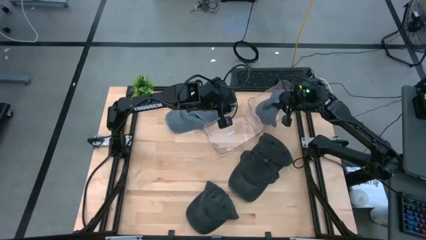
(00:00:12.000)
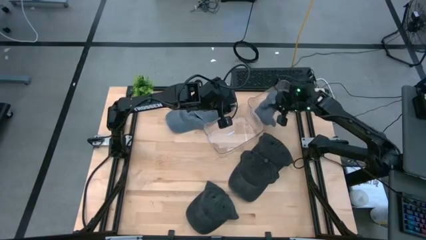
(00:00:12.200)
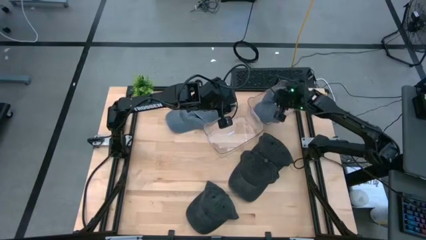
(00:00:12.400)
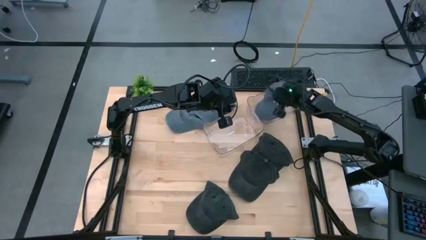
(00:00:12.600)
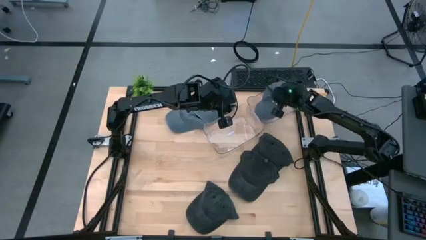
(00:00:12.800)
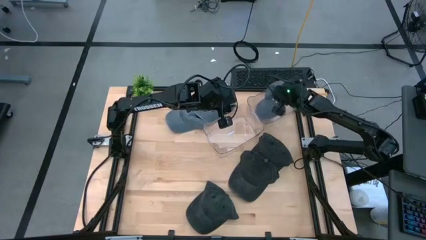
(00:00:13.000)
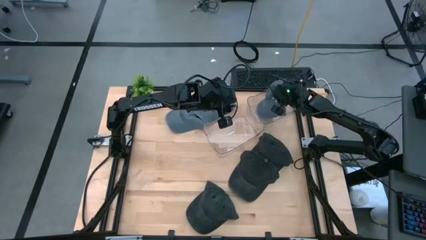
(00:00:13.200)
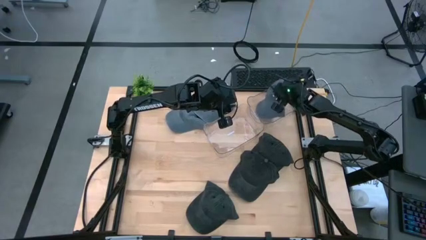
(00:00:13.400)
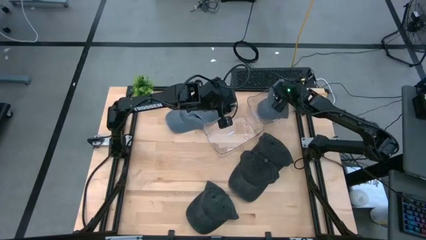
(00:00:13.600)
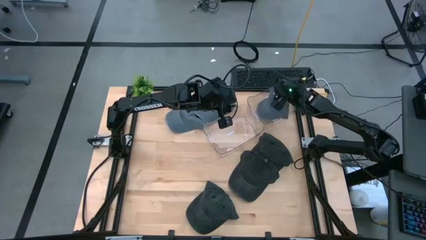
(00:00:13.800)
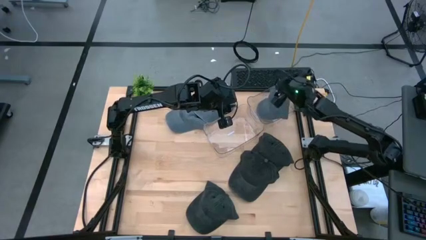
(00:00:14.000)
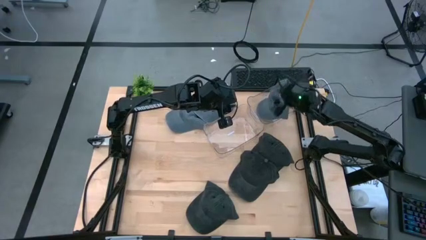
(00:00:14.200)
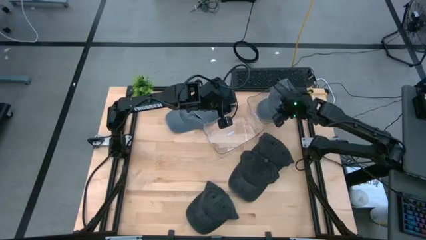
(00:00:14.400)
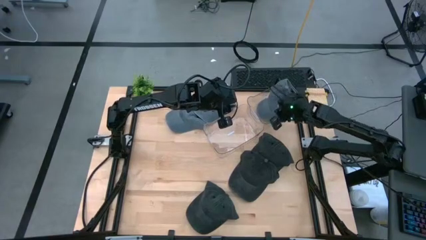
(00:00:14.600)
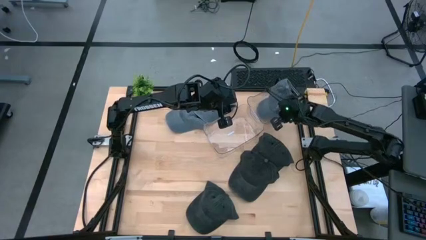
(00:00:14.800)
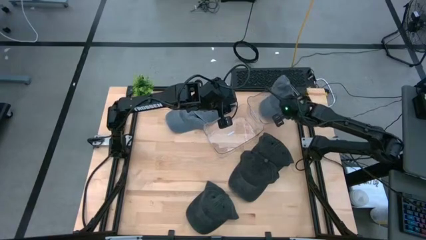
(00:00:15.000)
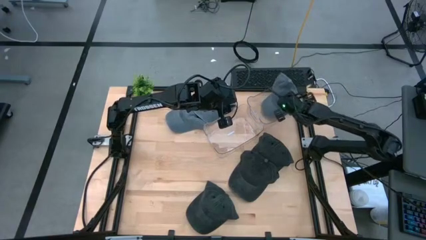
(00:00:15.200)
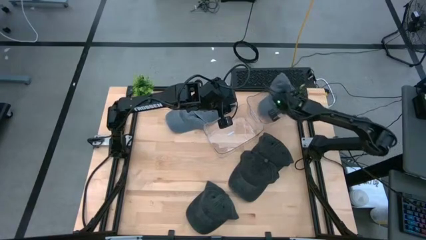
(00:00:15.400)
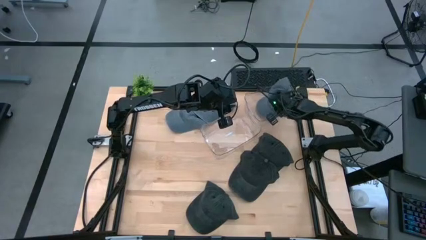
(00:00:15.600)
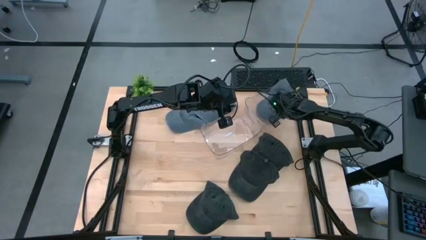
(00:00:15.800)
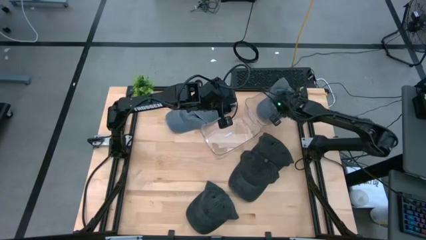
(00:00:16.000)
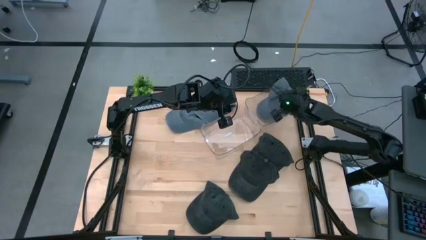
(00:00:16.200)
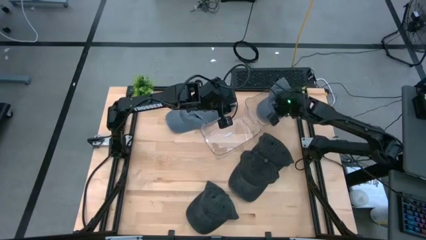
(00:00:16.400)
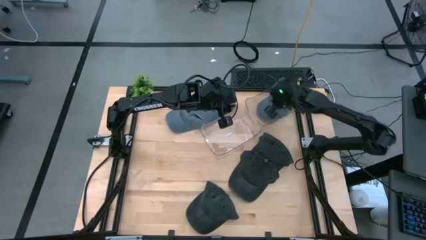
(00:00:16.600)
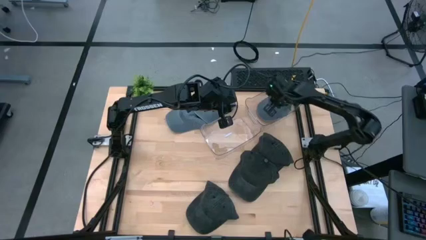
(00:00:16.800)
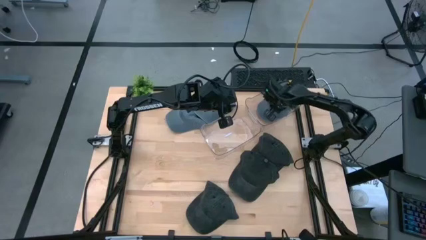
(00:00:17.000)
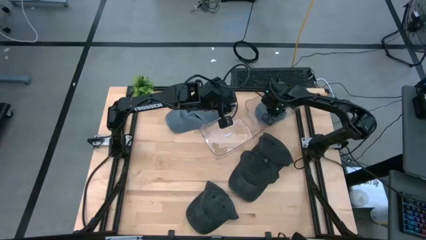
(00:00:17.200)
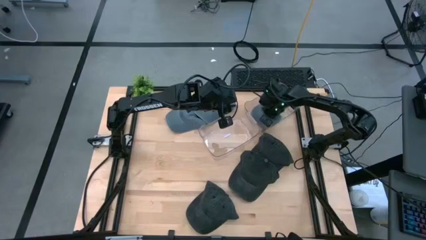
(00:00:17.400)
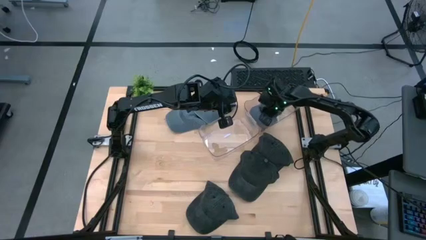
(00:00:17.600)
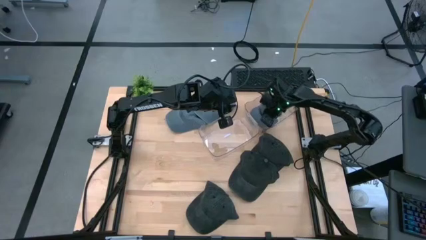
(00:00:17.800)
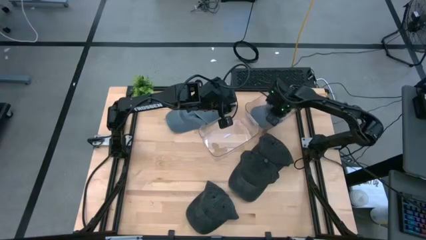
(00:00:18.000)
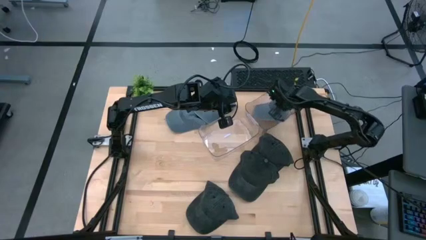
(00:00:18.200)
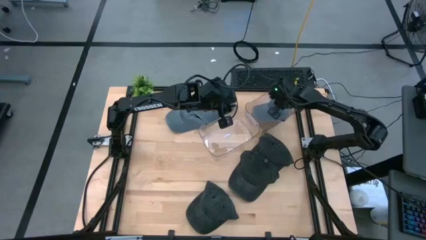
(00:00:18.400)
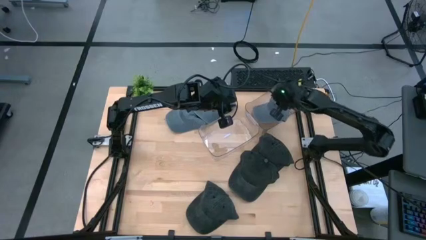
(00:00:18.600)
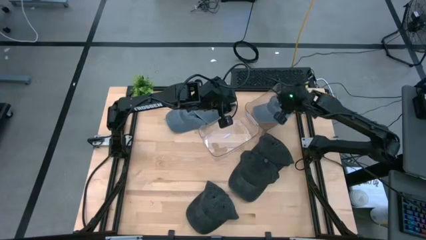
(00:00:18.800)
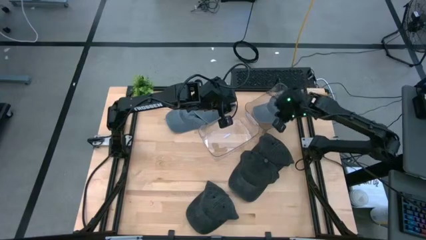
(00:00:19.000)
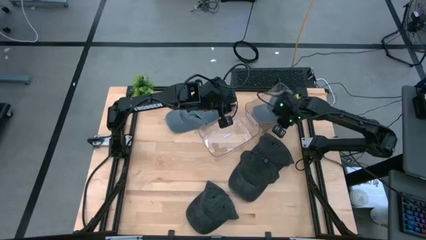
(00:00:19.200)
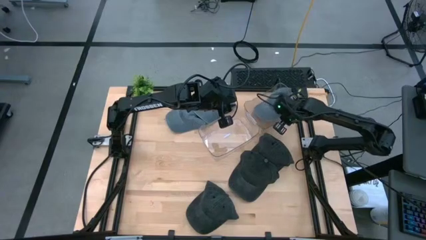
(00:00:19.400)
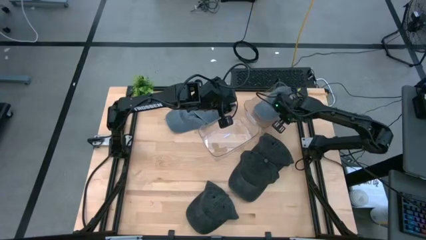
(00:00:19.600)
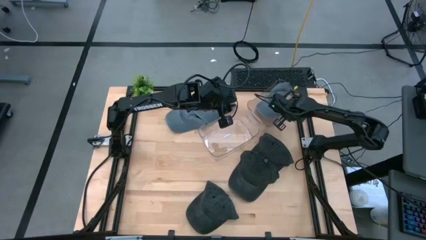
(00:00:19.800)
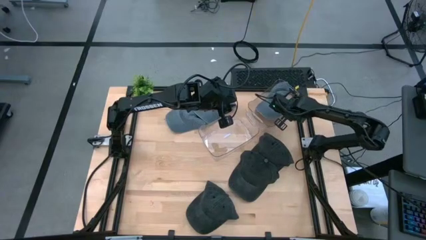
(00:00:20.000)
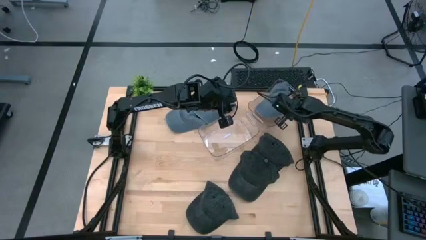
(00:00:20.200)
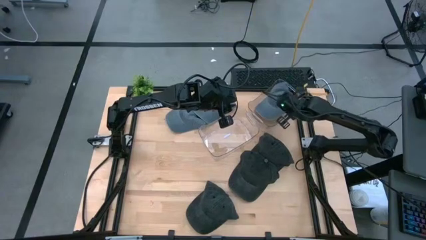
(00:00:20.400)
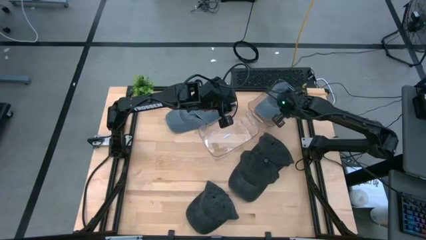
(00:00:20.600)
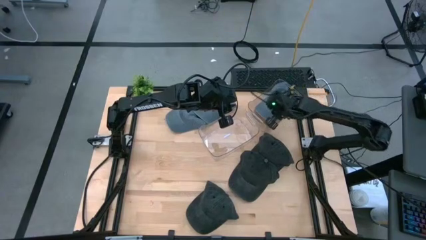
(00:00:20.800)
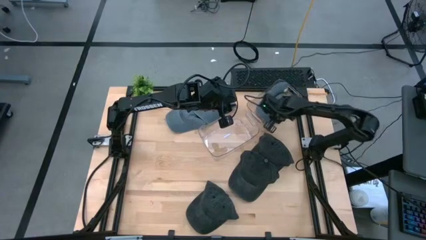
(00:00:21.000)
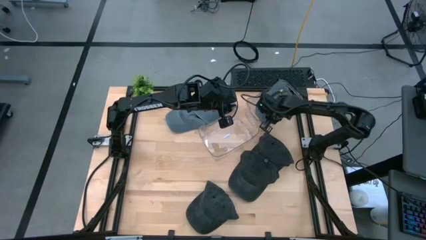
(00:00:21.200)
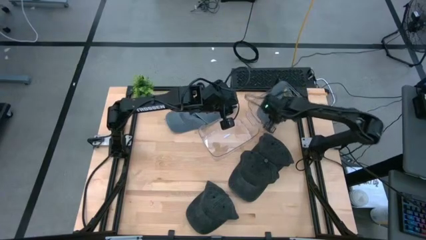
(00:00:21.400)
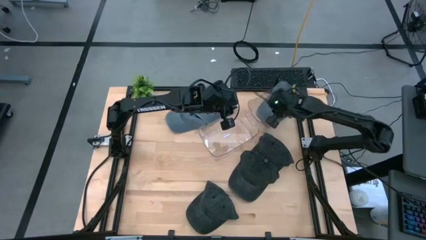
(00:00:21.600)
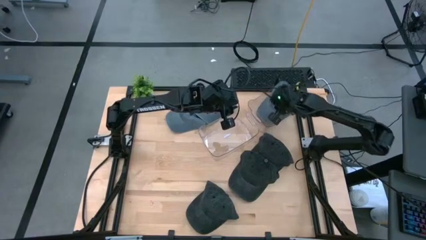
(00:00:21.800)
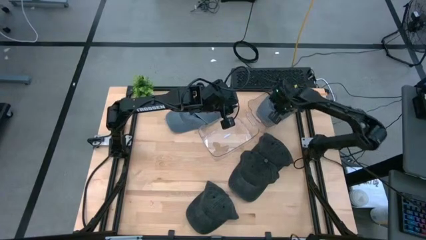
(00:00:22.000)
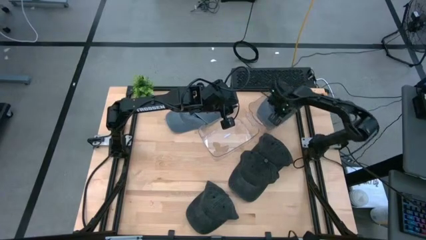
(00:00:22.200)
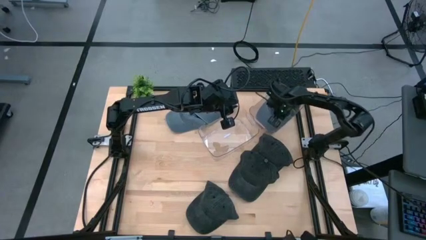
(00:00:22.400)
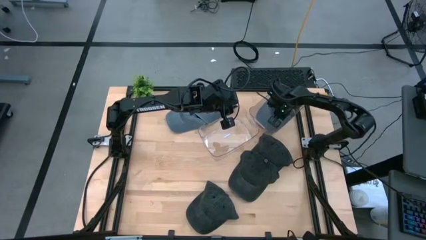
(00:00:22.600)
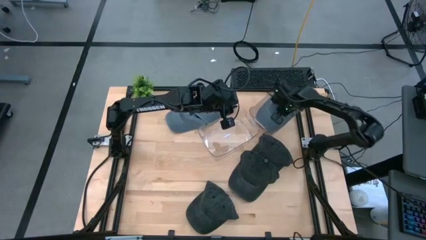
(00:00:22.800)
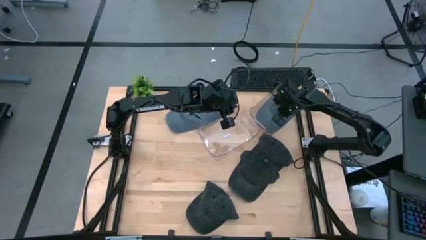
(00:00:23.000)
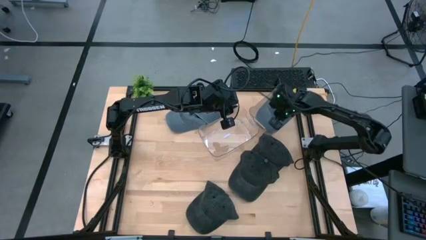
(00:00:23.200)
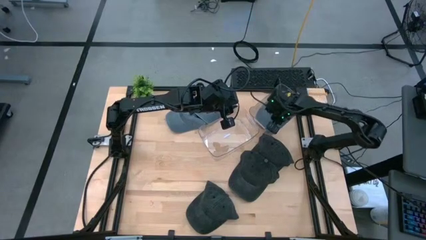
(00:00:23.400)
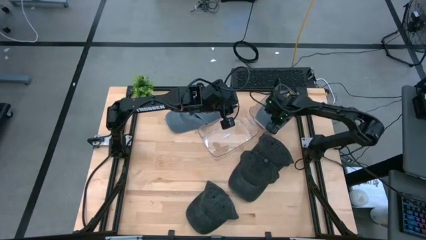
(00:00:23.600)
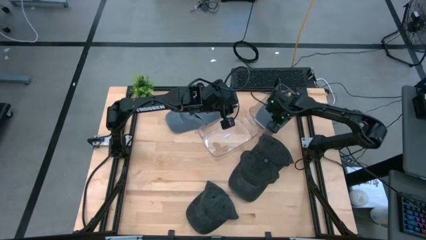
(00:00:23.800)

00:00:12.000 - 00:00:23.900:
Task: Pick & Place hat
Put the bottom gray cap into the right transparent bin

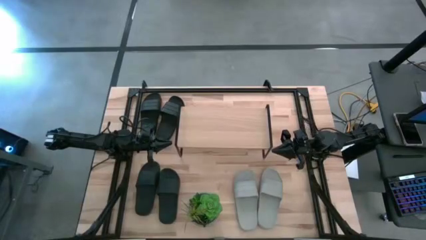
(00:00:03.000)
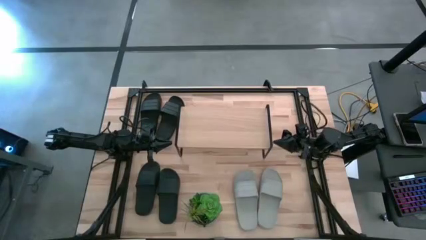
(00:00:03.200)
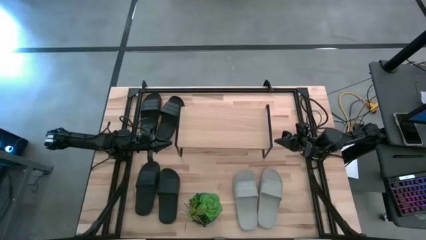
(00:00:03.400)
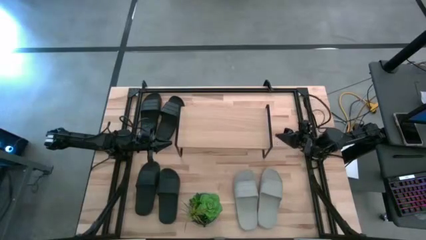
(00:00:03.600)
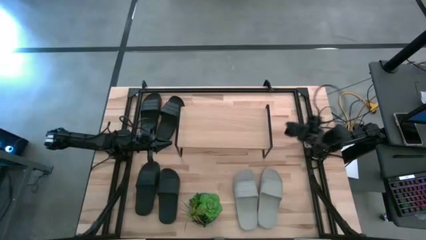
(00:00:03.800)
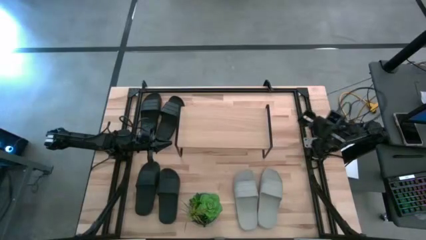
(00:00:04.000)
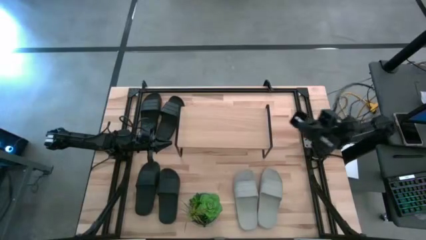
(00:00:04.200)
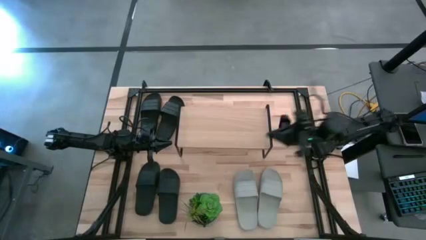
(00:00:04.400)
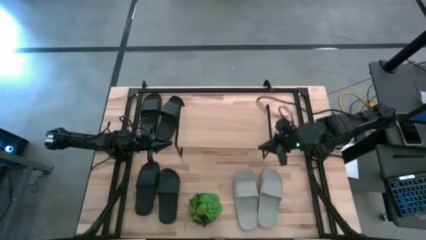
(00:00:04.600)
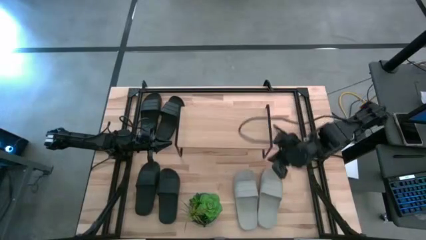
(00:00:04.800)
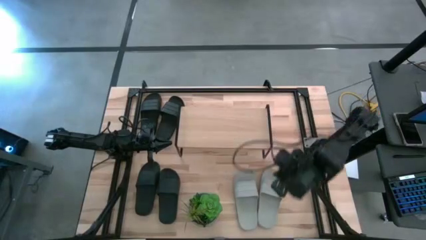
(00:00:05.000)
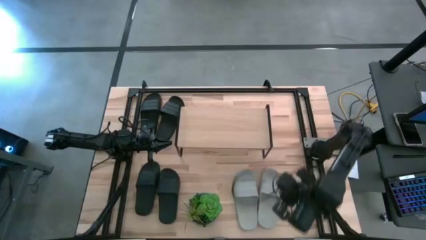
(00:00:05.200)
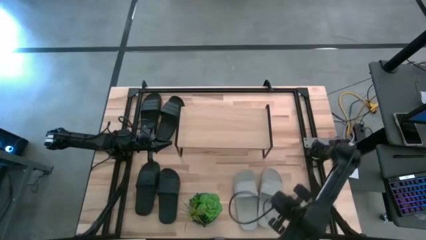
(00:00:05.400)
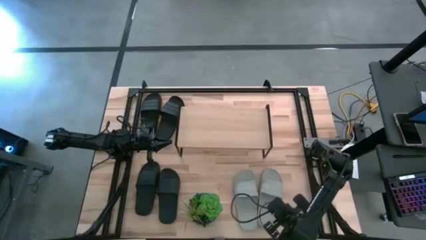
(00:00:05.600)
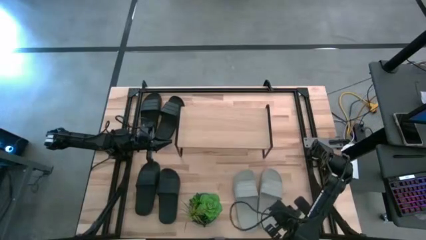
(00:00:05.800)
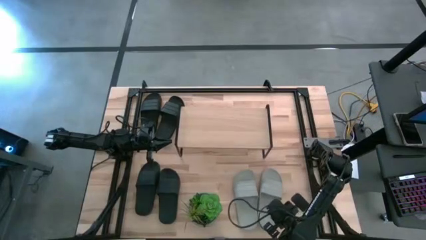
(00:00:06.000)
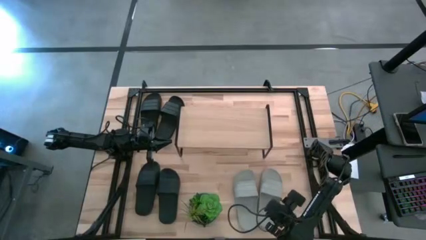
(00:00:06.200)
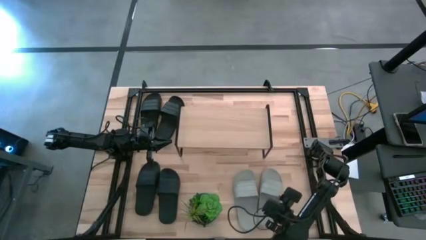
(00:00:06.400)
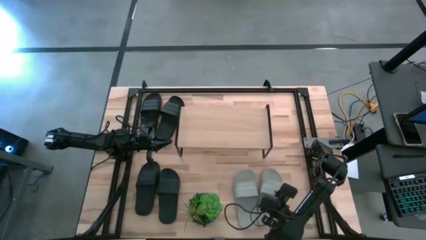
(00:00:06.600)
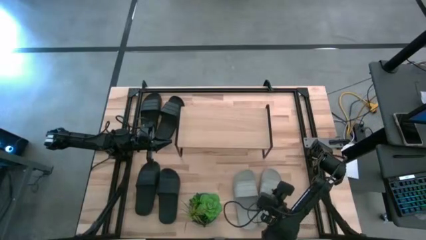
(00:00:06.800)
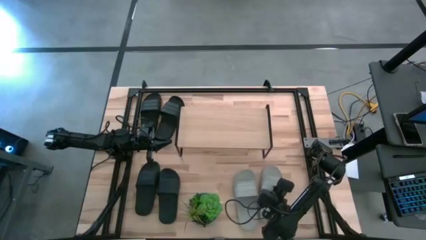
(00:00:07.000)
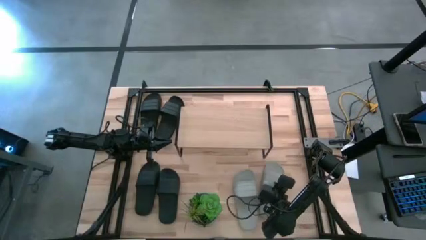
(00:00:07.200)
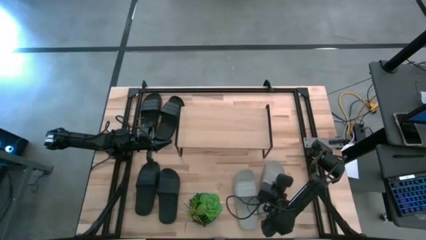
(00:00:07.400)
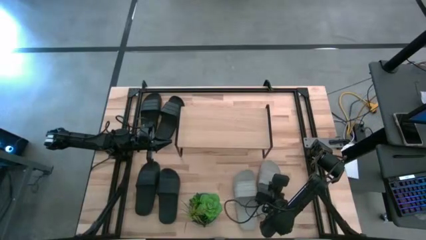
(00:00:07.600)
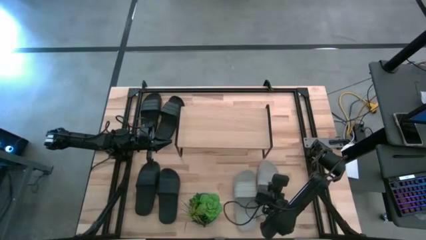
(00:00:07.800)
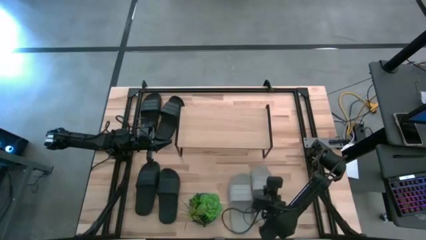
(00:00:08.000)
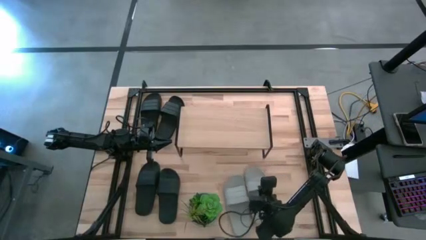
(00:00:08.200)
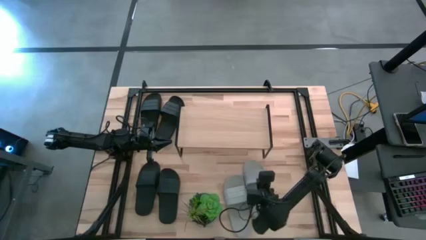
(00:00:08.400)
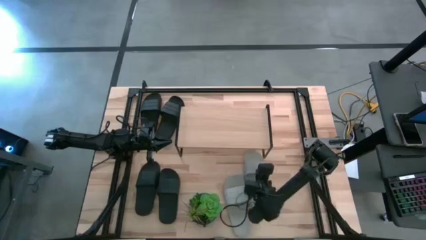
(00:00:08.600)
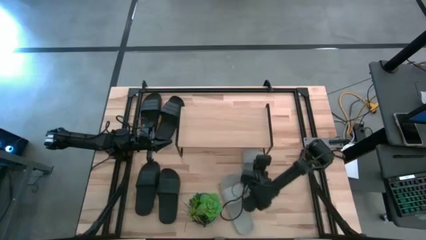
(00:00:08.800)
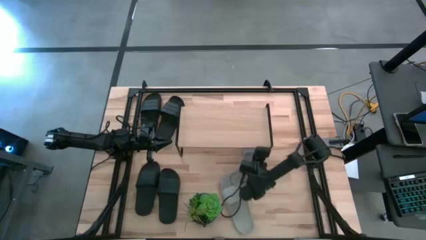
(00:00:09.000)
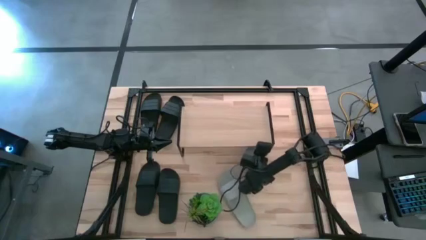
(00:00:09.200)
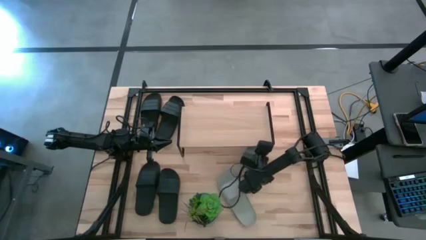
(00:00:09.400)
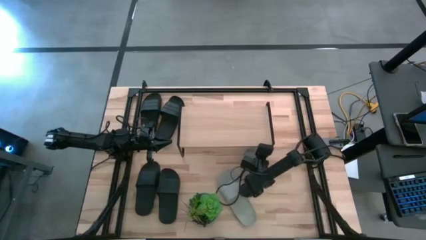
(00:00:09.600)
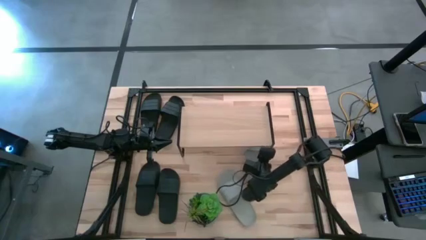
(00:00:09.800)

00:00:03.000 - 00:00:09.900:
Task: Pick and place slides into the shelf
Put the gray slide under the shelf
